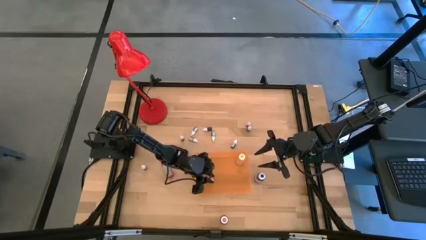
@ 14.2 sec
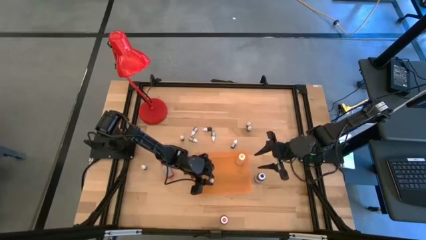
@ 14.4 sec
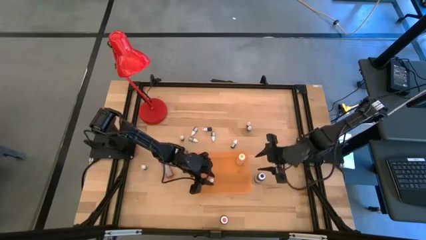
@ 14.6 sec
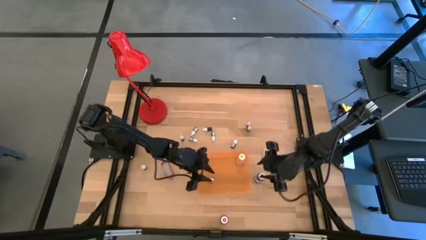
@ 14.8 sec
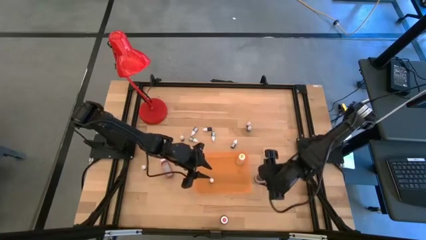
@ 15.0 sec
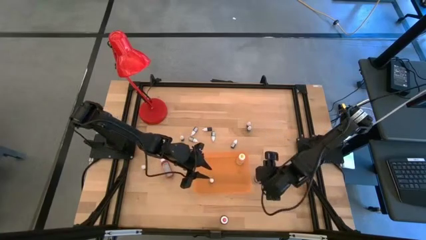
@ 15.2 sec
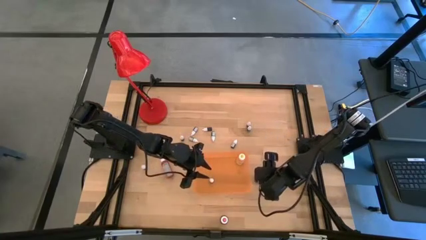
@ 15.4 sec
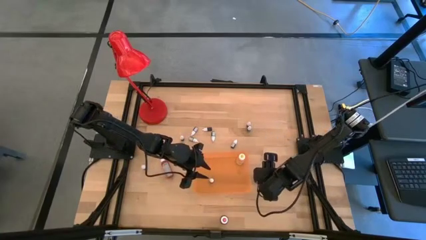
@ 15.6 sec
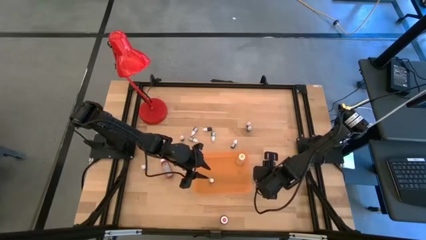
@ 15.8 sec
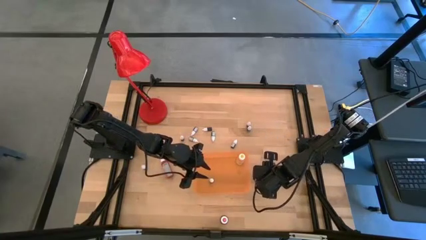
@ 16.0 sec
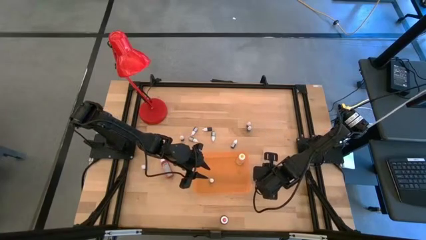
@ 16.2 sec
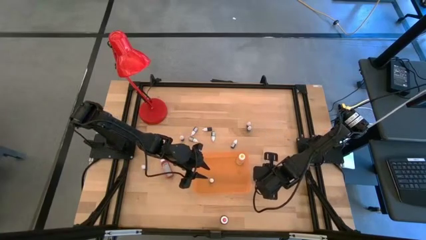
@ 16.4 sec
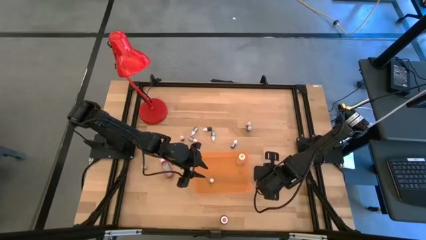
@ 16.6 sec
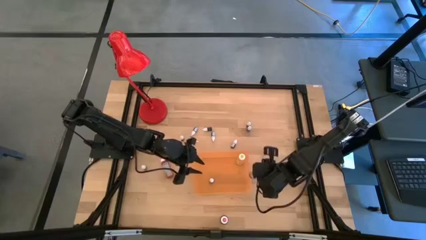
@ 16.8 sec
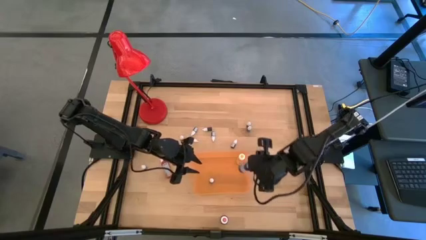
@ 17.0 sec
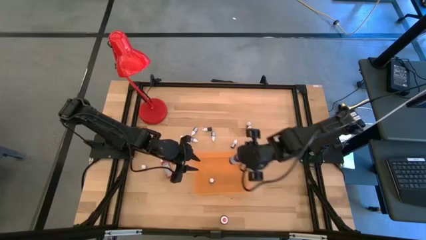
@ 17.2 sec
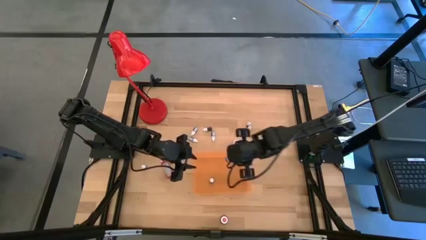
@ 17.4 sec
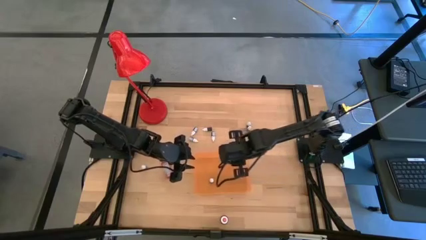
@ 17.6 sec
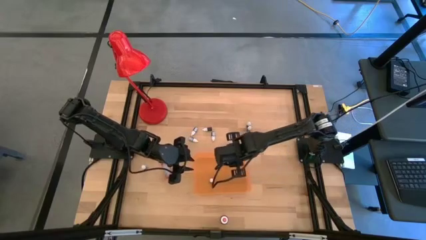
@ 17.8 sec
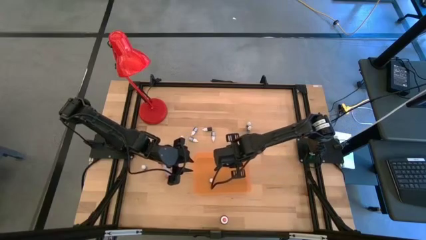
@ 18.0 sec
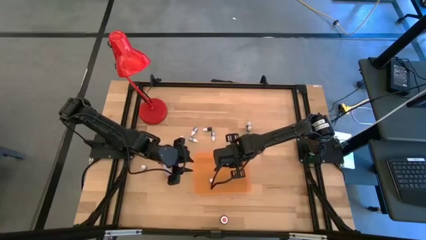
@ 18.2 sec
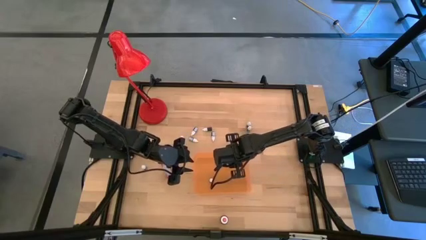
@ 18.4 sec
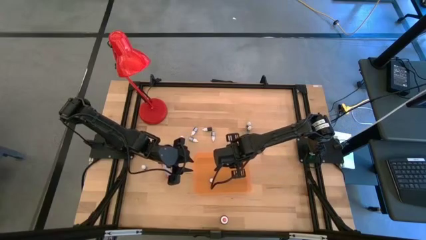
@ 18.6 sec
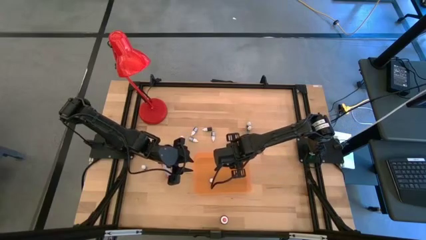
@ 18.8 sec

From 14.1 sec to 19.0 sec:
Task: Pick & Place food coloring
Put the big blue food coloring bottle into the orange bin

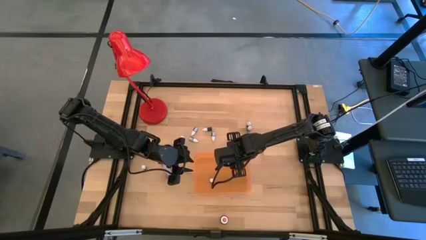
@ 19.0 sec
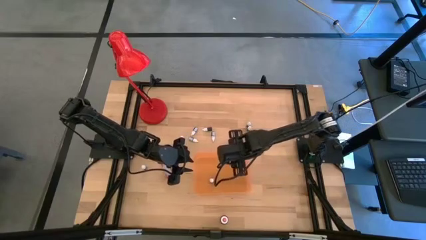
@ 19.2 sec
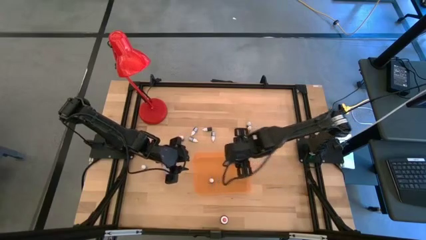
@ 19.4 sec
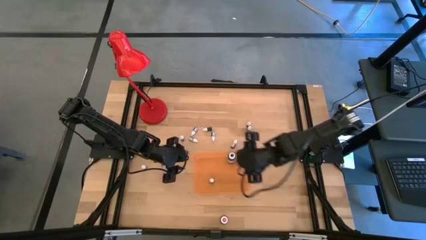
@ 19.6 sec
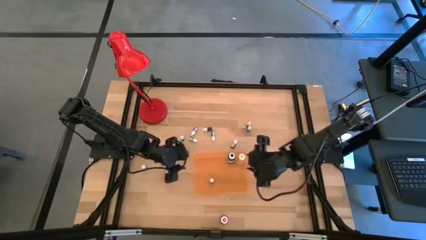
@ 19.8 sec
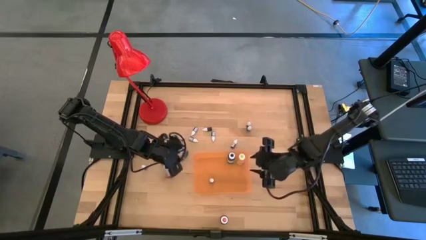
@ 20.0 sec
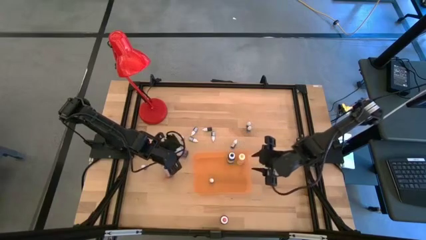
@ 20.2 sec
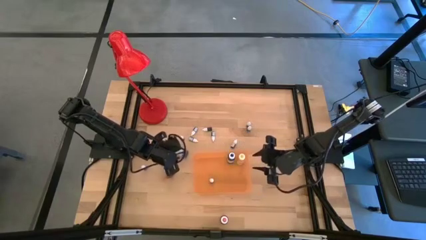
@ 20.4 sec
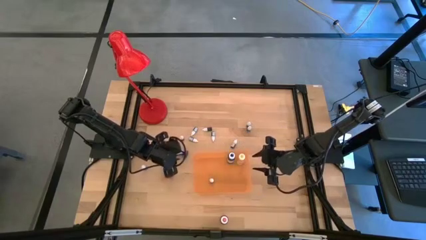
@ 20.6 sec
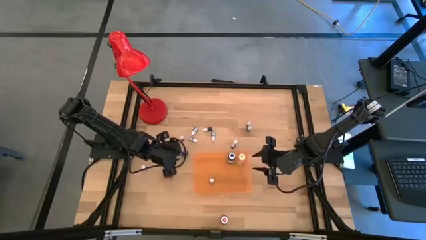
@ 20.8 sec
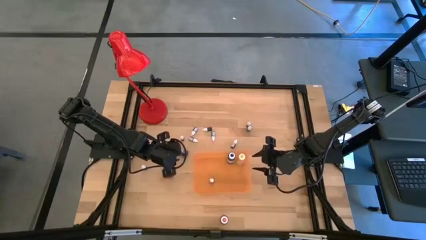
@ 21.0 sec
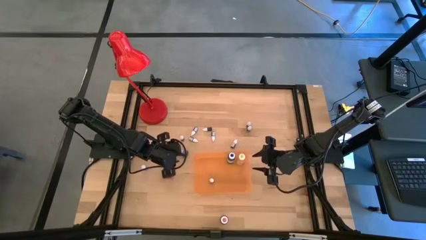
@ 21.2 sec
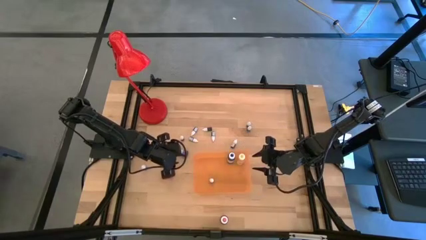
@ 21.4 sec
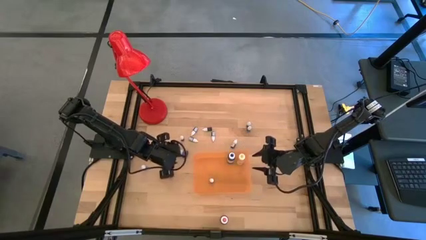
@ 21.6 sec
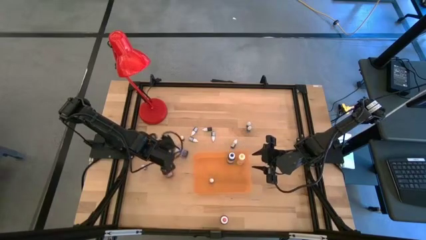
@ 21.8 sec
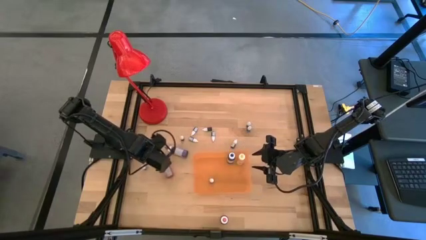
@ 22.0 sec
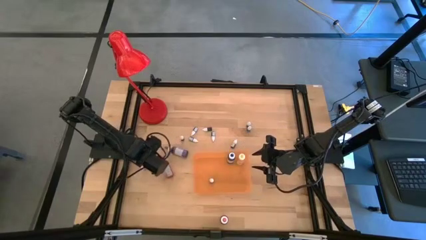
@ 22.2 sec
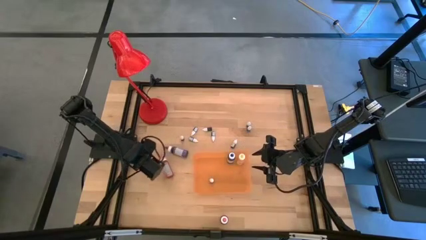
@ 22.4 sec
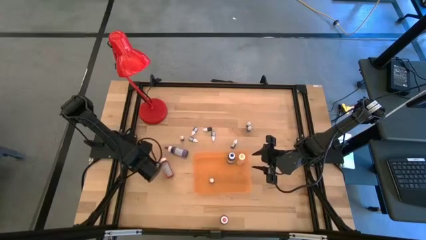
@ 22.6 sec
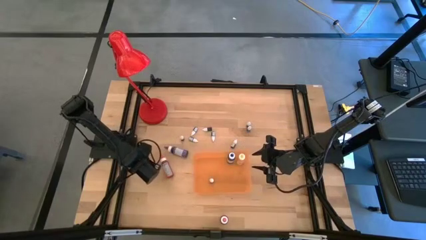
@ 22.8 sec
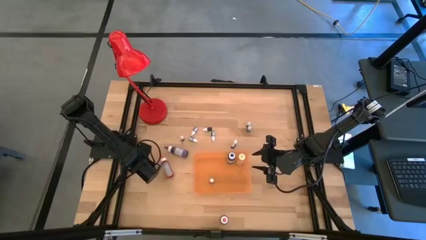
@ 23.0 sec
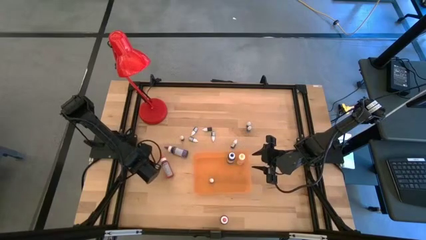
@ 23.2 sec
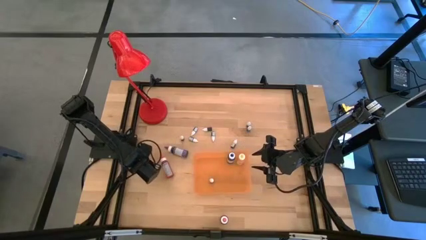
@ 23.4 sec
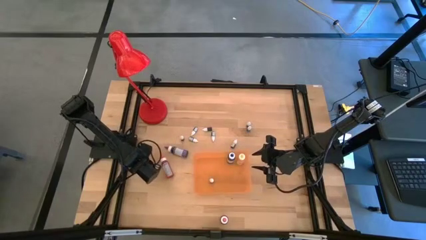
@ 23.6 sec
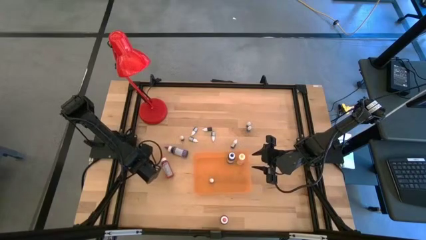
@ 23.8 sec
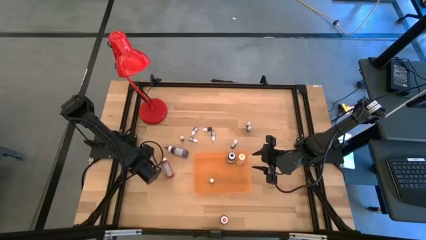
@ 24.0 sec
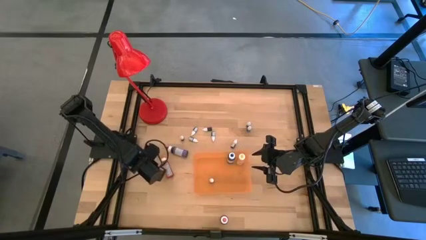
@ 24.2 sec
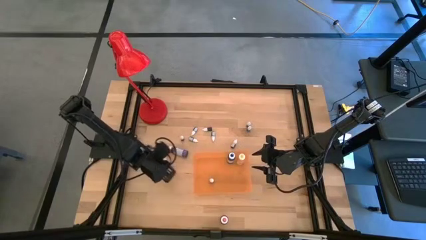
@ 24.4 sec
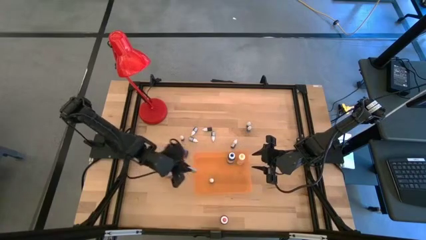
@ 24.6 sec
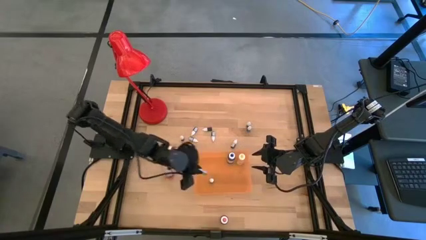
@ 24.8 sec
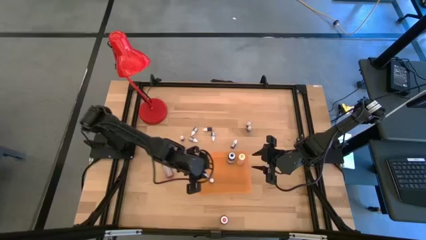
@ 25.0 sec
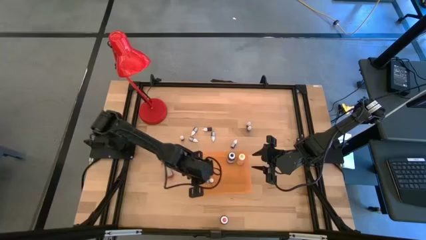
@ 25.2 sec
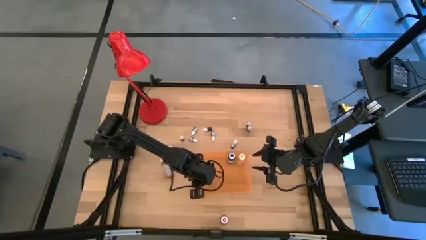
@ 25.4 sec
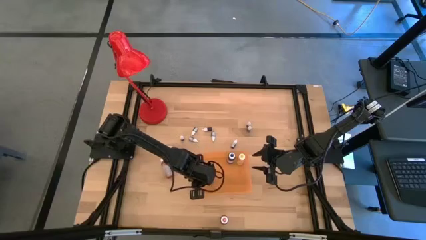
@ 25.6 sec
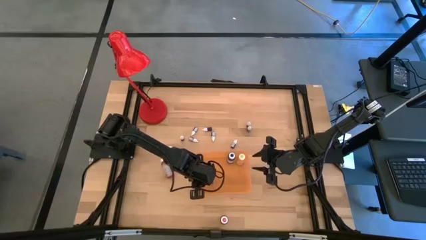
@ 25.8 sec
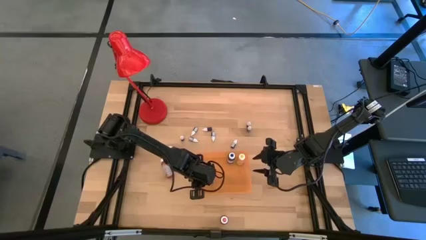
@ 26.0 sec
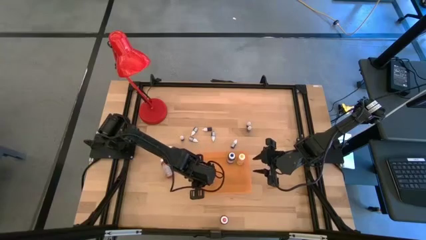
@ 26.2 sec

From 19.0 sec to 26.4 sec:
Put the bottom small green food coloring bottle into the orange bin

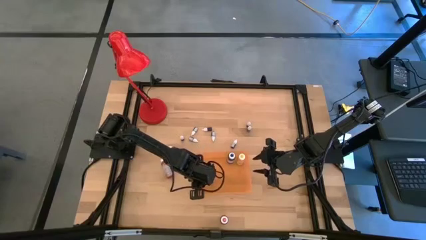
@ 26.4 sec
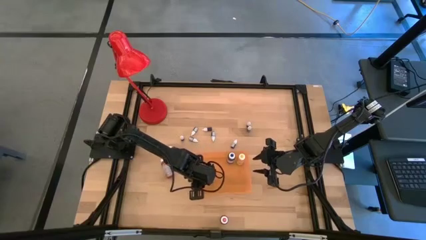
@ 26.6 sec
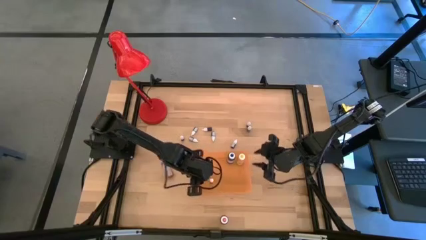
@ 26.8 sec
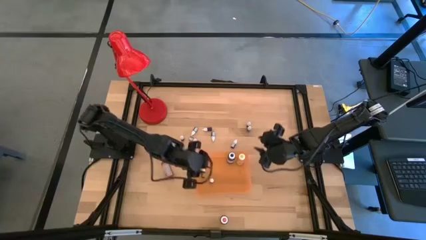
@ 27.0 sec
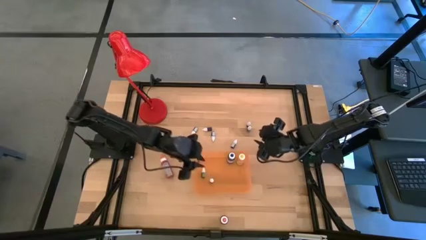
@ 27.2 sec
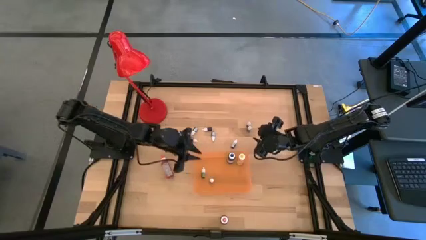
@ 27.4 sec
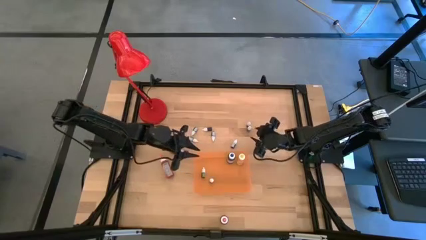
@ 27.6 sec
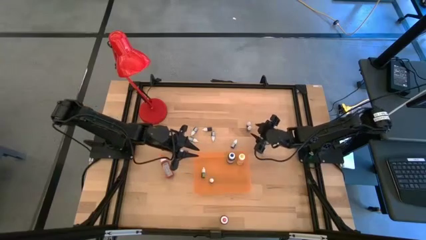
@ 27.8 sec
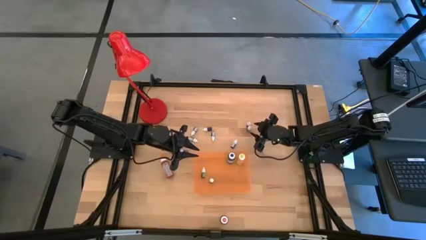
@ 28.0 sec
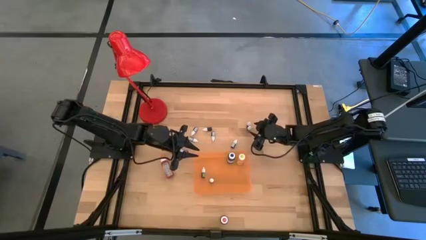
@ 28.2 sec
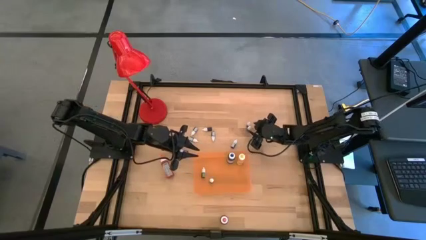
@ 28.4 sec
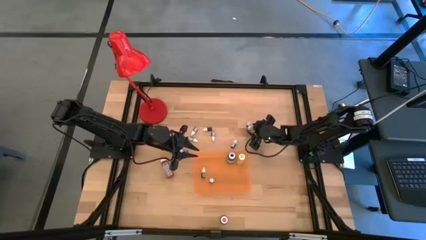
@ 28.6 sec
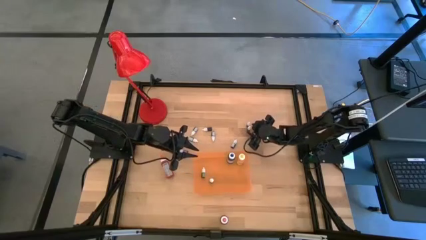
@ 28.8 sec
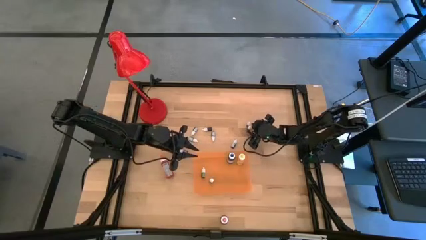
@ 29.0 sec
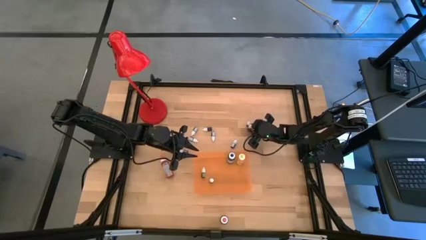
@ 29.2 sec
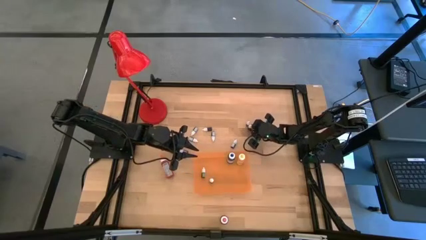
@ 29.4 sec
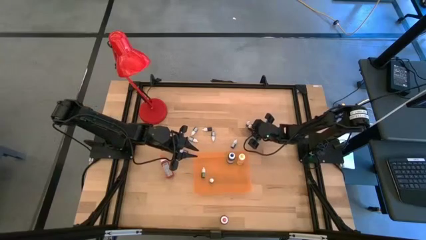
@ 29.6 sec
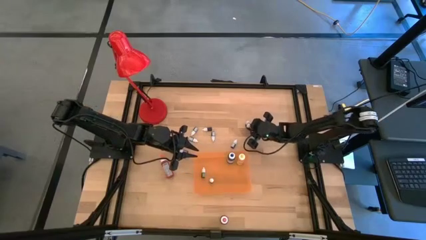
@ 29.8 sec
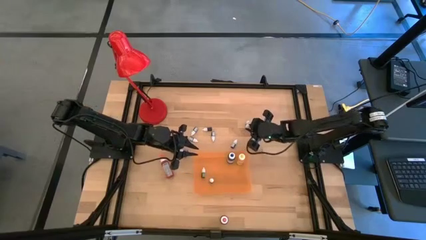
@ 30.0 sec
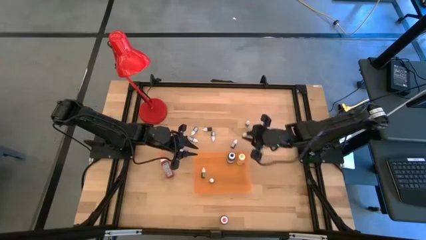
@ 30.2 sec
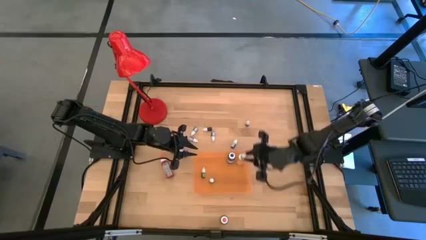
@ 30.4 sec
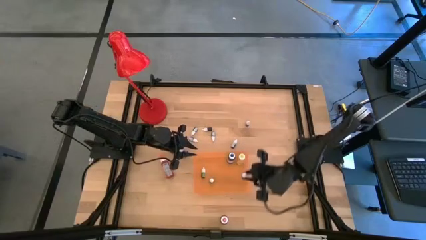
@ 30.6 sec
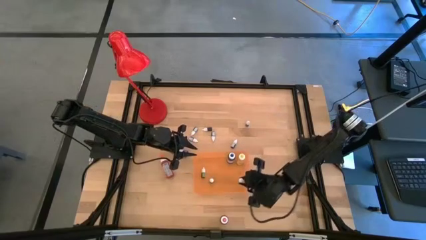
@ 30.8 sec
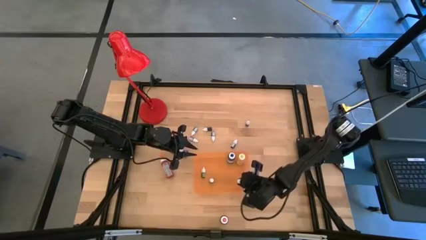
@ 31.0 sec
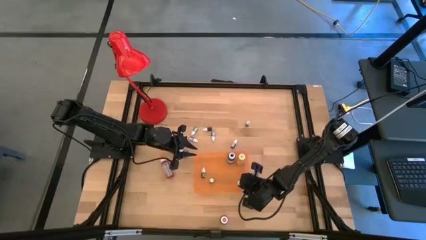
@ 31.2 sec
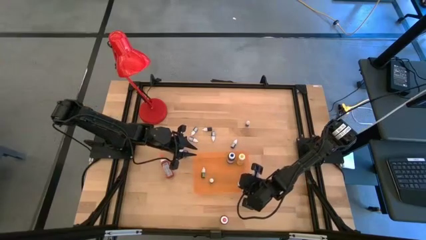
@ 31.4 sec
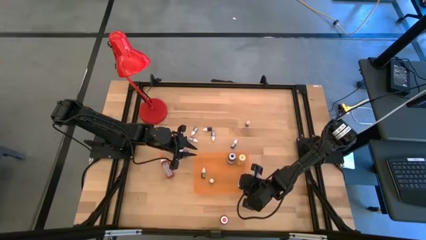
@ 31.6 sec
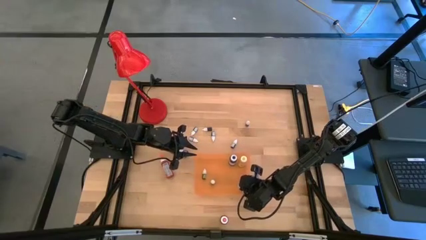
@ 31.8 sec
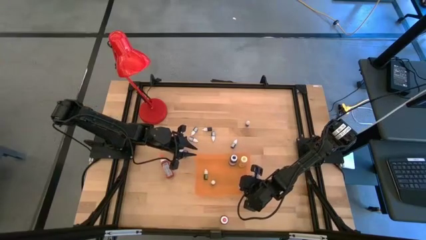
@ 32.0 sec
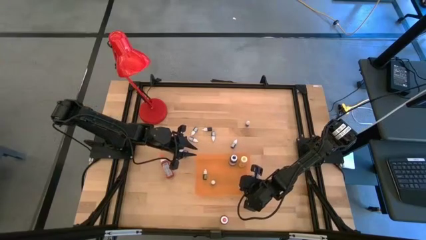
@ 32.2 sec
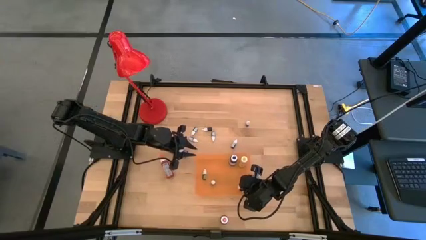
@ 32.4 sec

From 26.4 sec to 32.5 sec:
Put the right small blue food coloring bottle into the orange bin
